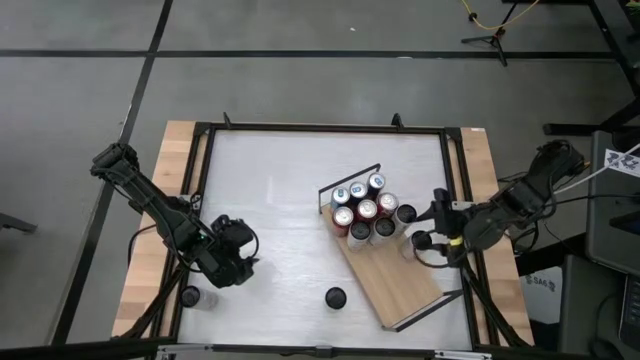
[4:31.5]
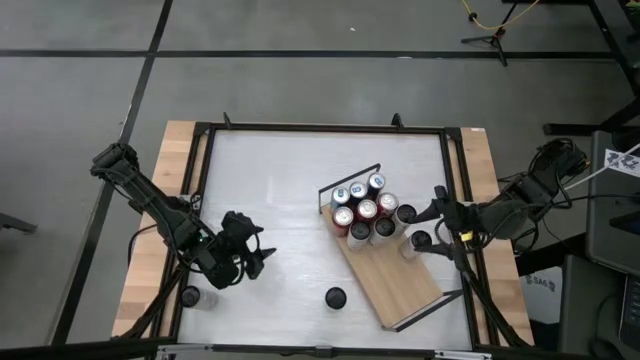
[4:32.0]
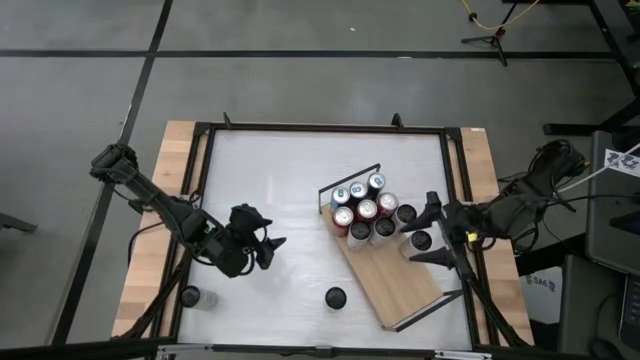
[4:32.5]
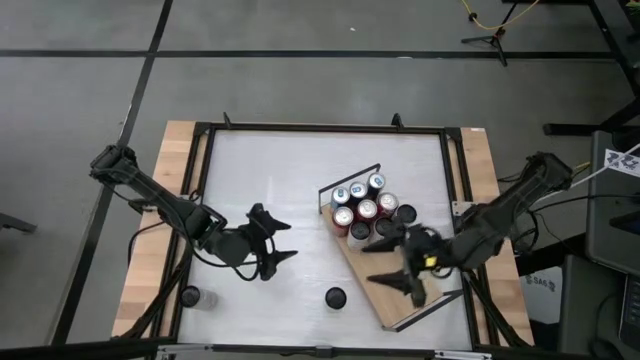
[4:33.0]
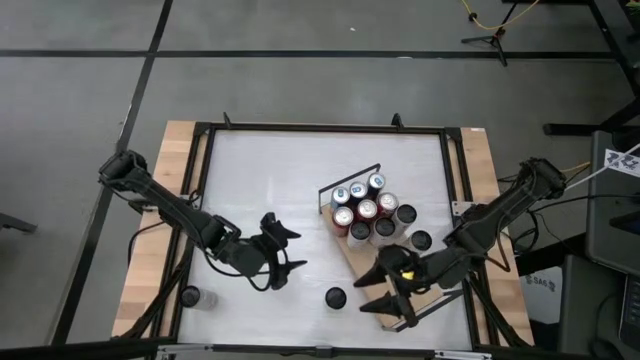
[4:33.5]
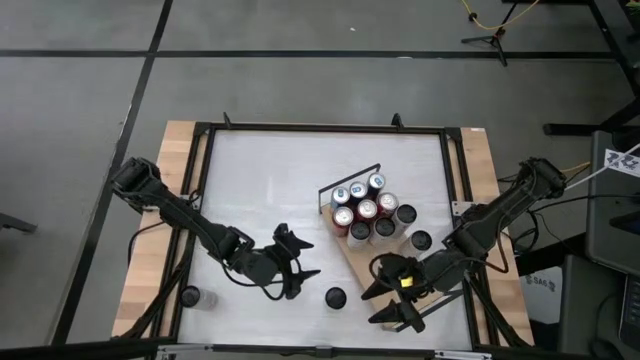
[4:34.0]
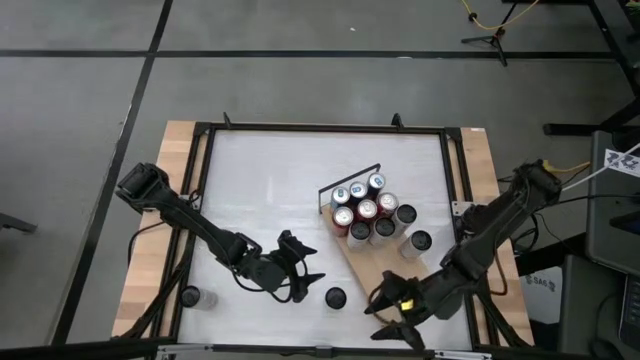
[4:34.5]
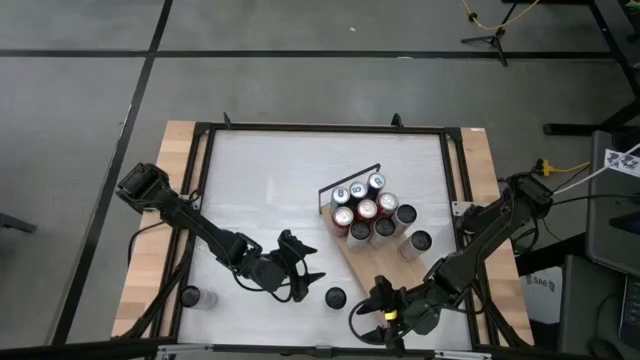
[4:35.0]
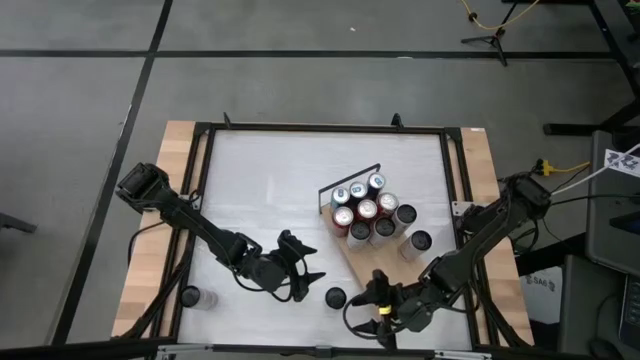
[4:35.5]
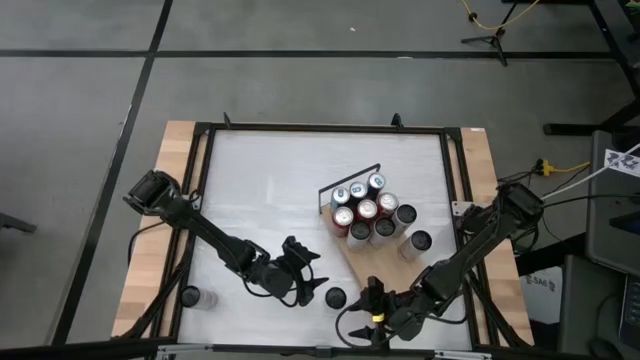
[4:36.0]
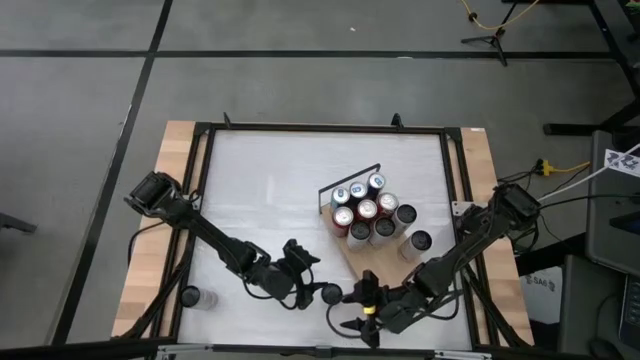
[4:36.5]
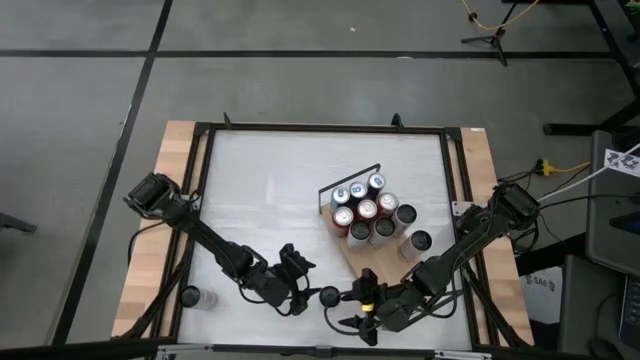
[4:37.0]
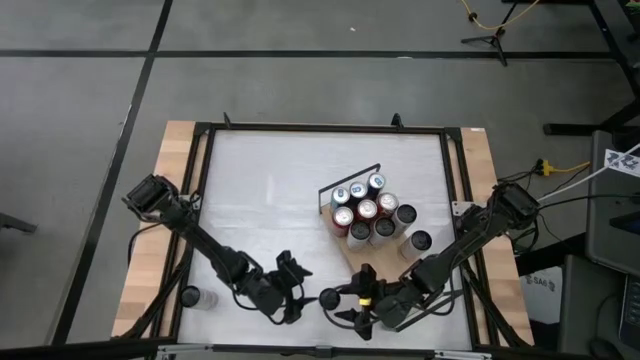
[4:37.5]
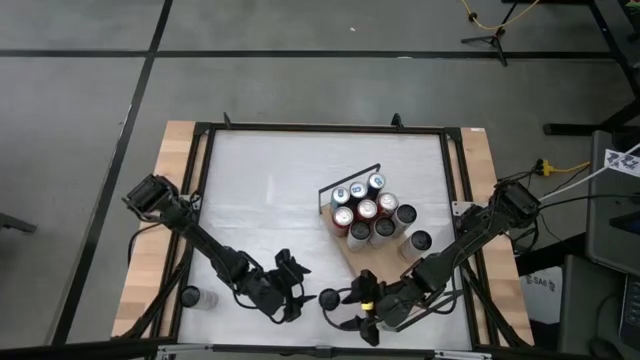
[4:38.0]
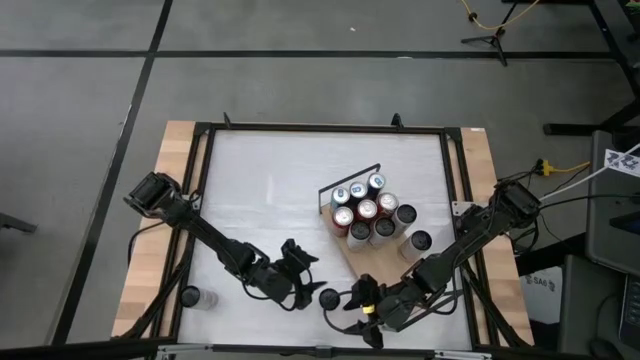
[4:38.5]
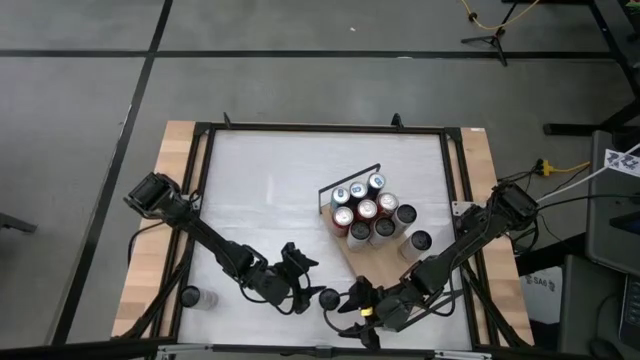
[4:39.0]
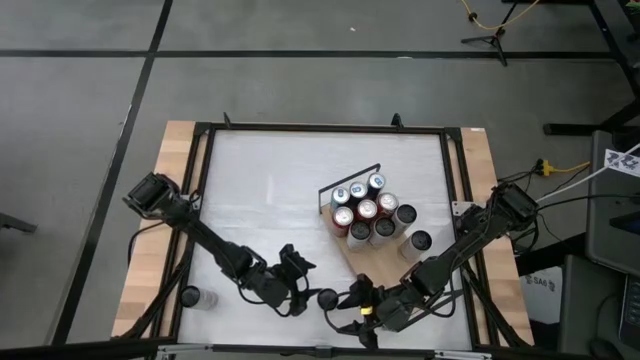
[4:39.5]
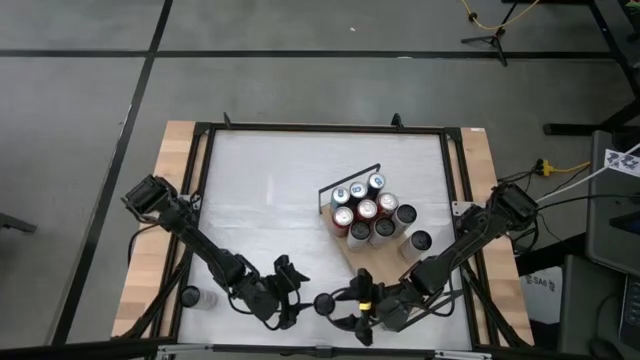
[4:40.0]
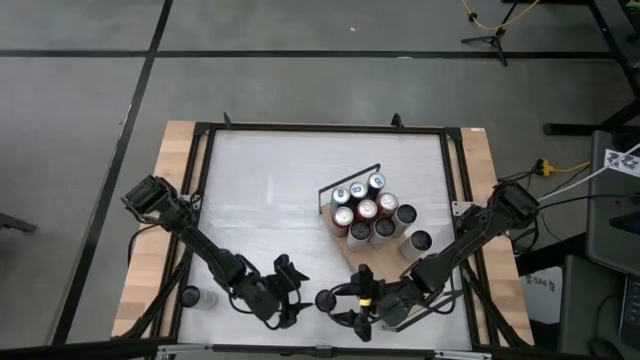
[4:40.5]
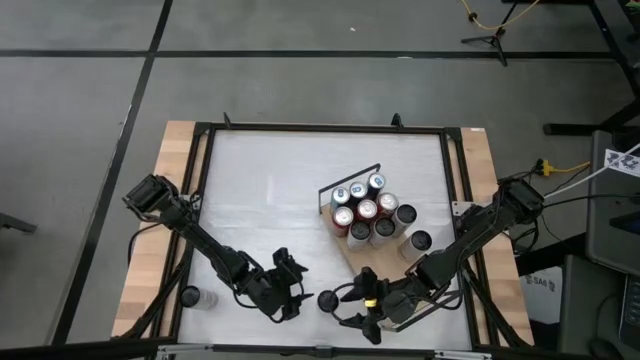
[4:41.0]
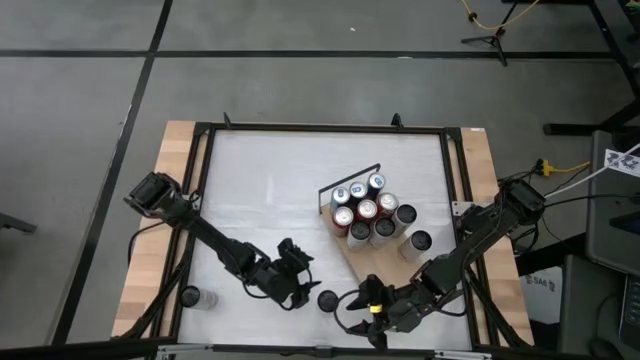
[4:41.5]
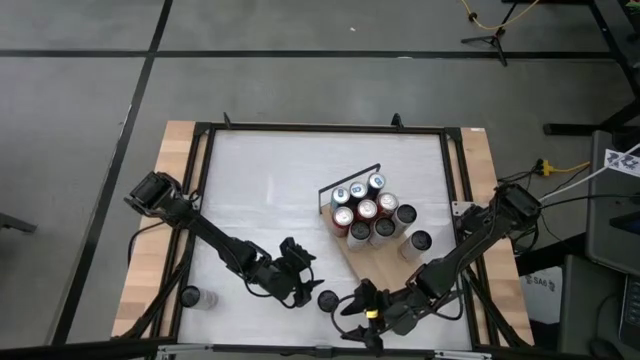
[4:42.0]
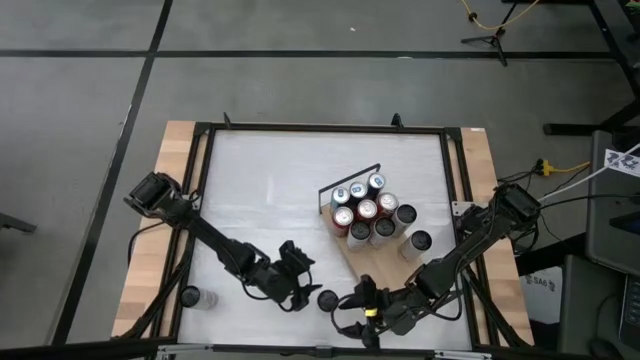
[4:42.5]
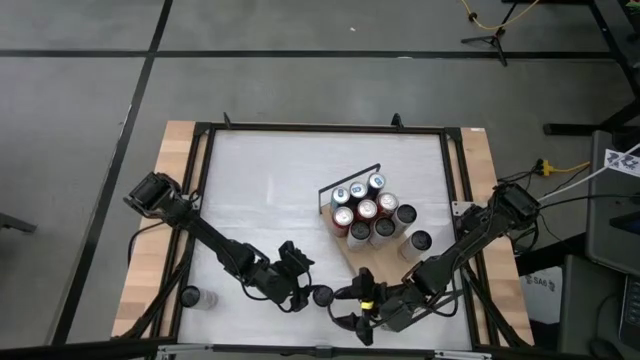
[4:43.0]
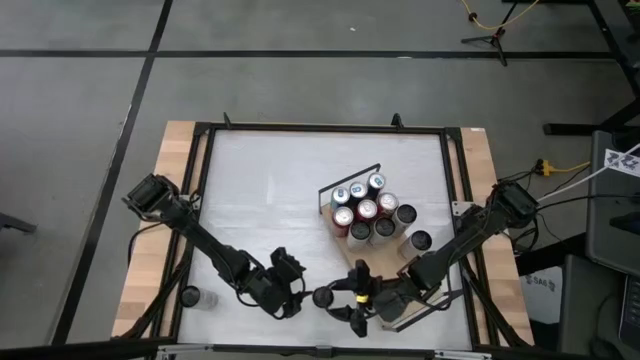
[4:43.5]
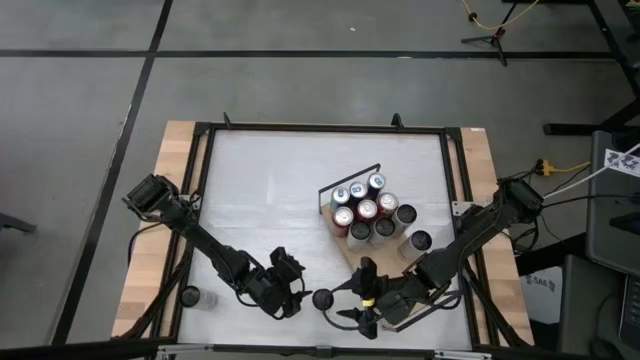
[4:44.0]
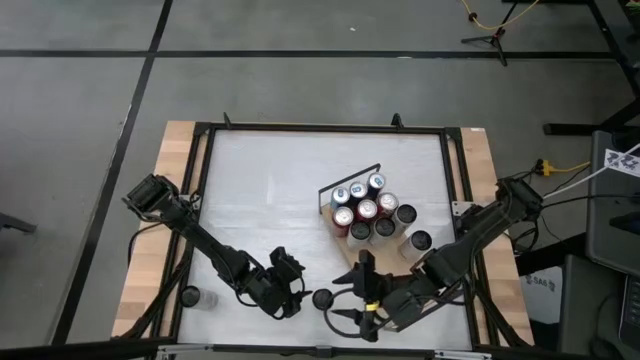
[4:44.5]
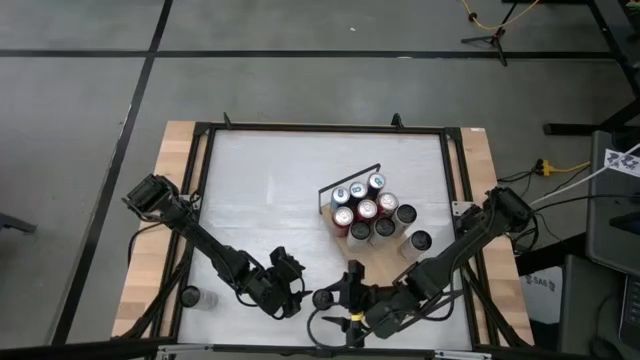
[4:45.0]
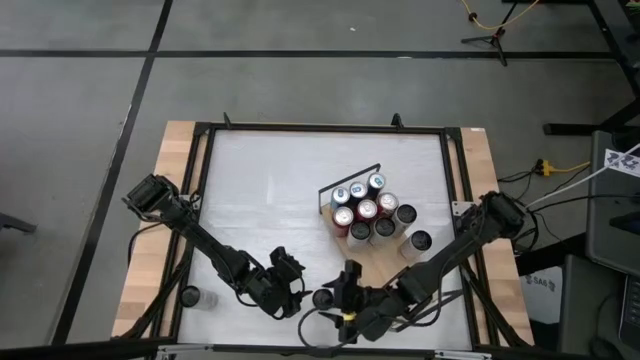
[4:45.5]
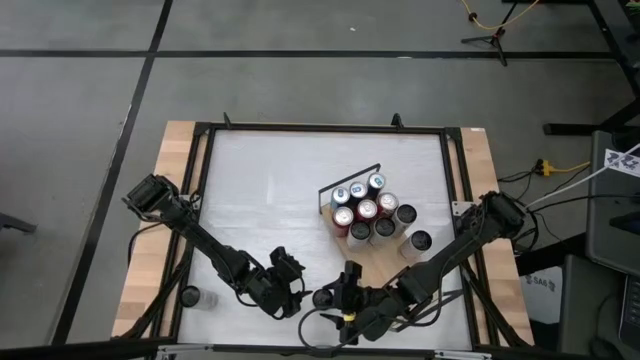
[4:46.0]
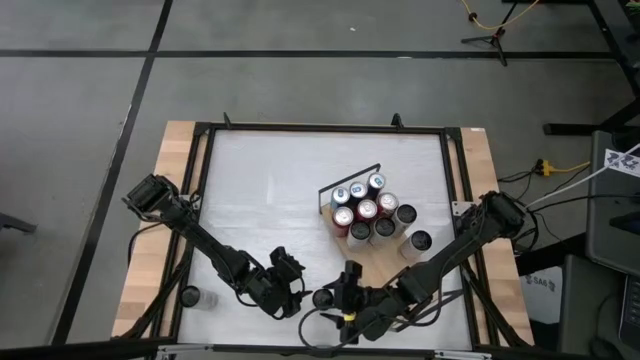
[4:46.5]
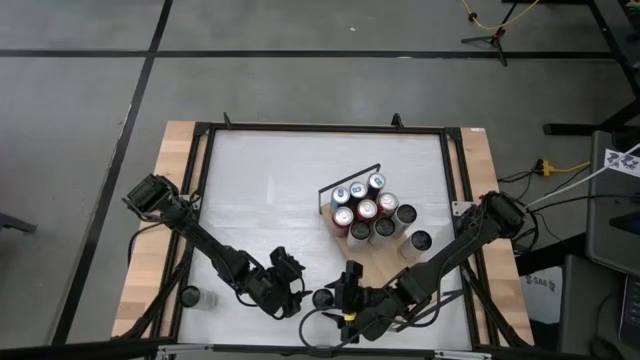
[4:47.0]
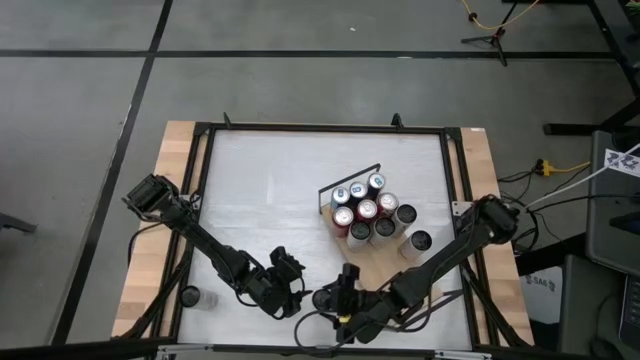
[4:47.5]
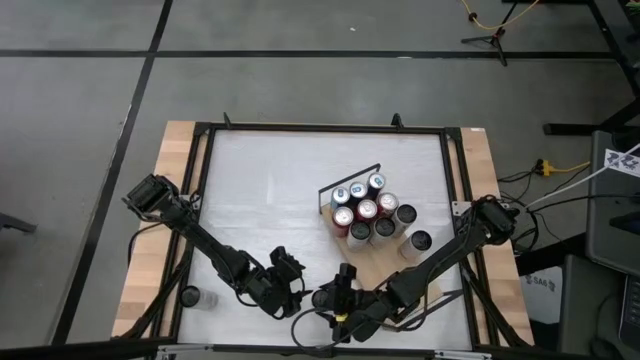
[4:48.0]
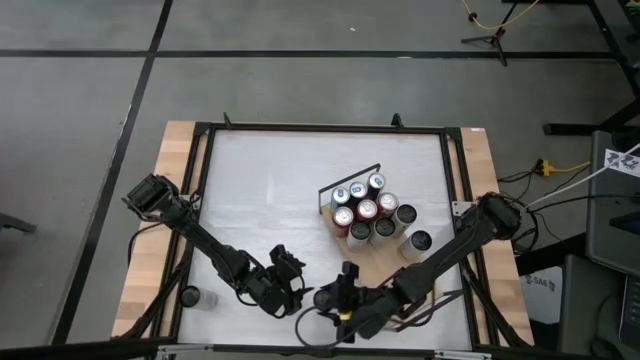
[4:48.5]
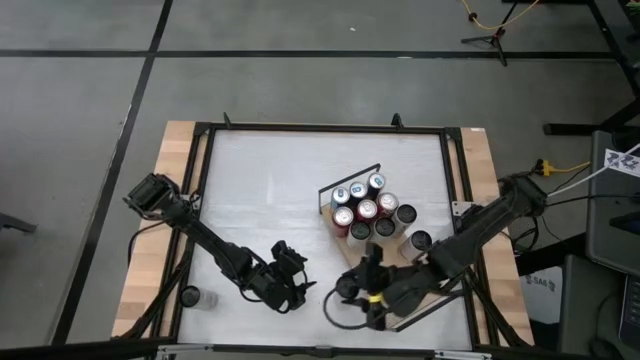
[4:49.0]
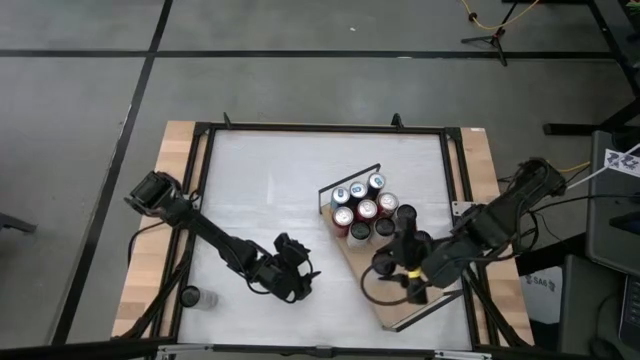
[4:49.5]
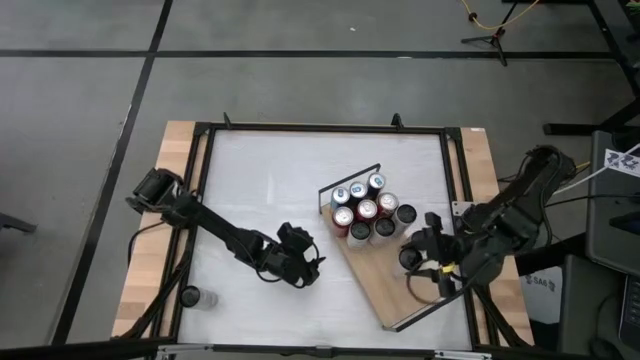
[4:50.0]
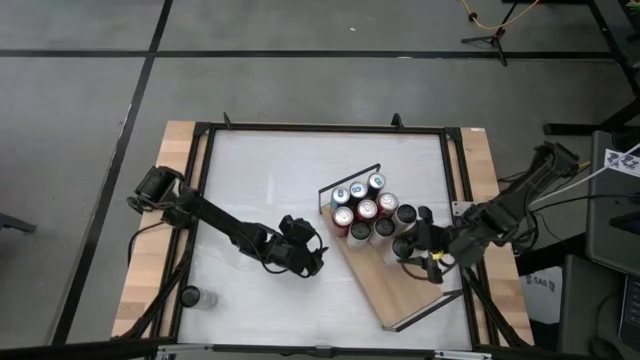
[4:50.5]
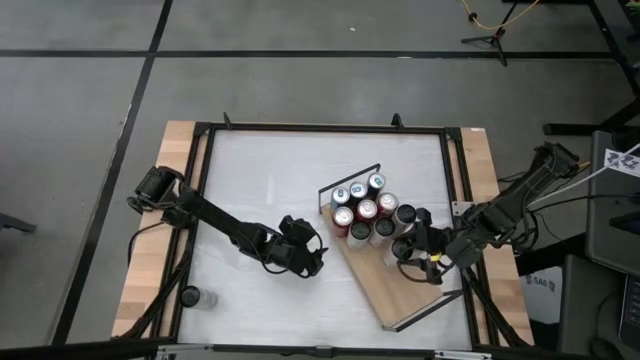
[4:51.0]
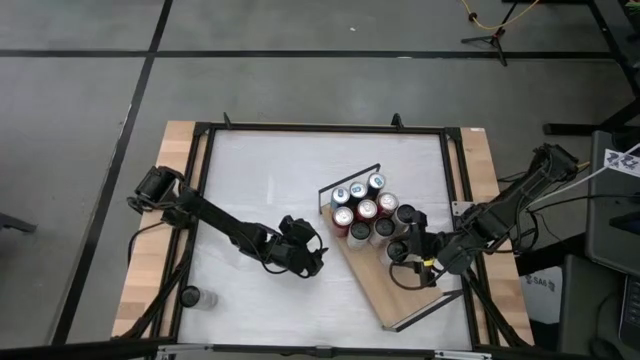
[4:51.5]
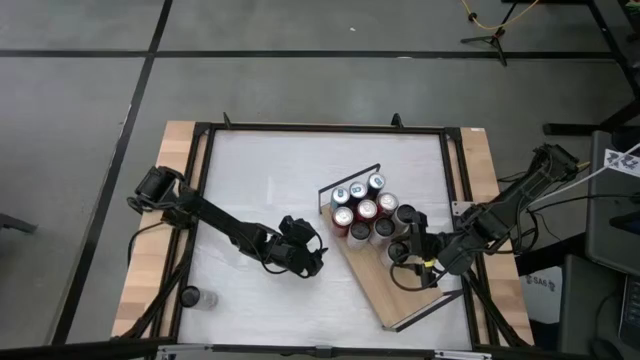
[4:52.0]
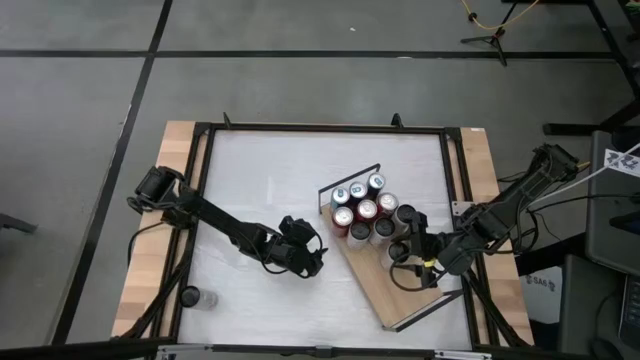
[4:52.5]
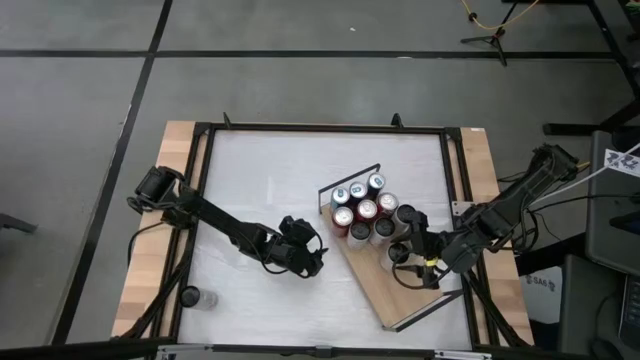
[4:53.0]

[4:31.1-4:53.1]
Task: Place canned beverage on shelf
Put the white pink soda can on the shelf aligned with the other white pink soda cans
